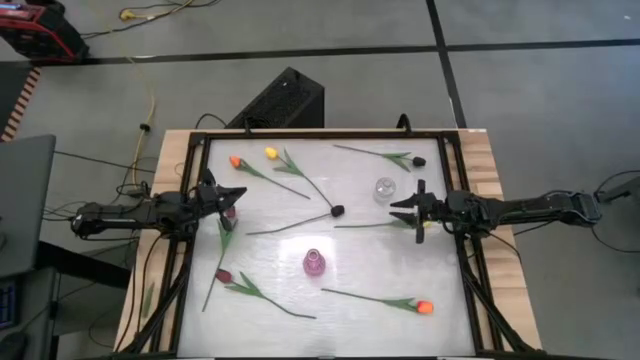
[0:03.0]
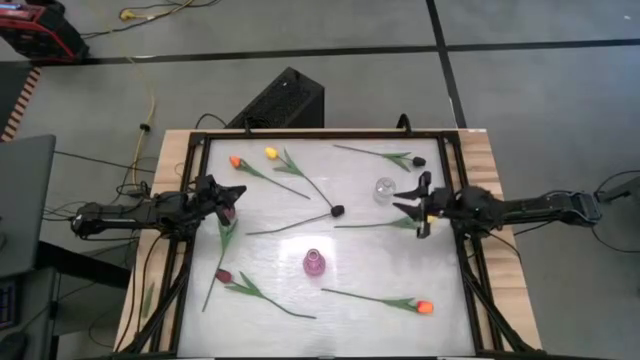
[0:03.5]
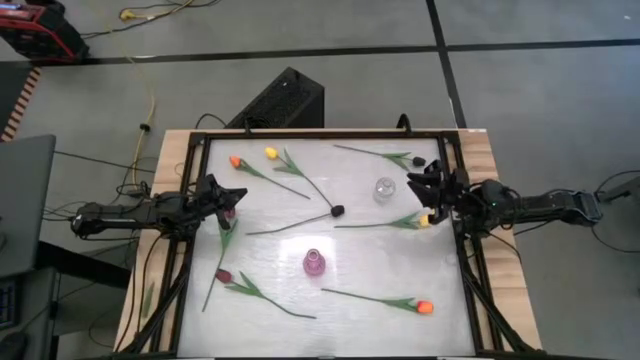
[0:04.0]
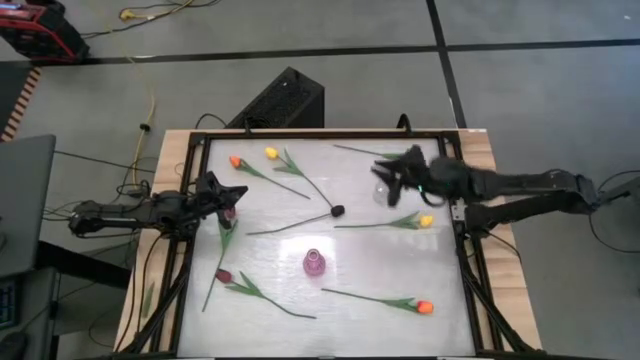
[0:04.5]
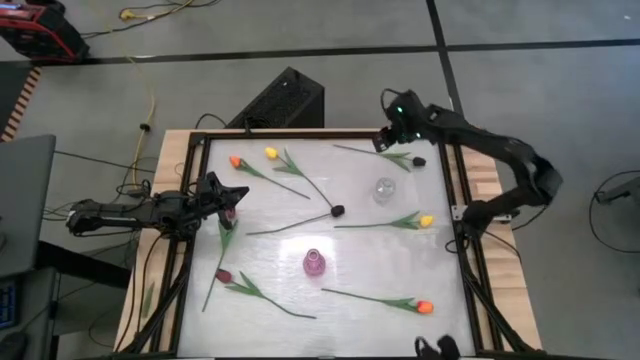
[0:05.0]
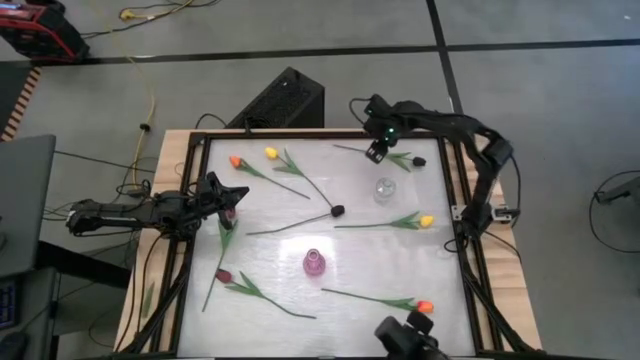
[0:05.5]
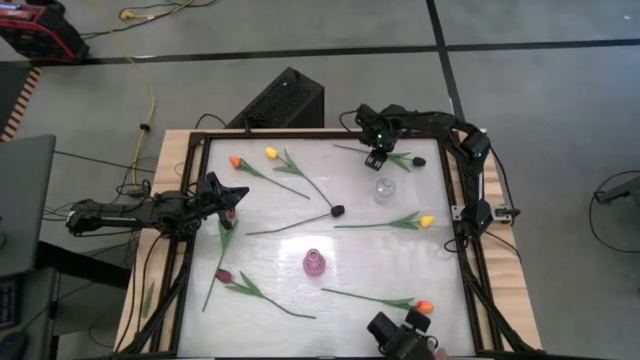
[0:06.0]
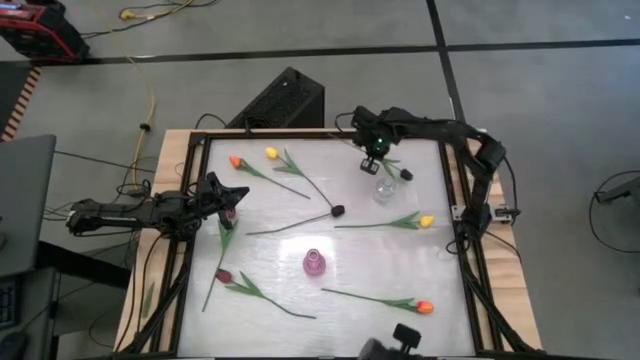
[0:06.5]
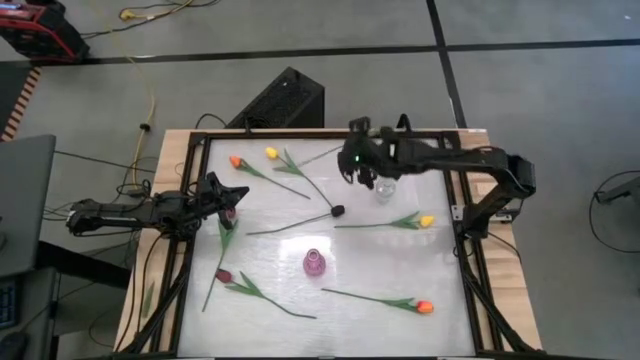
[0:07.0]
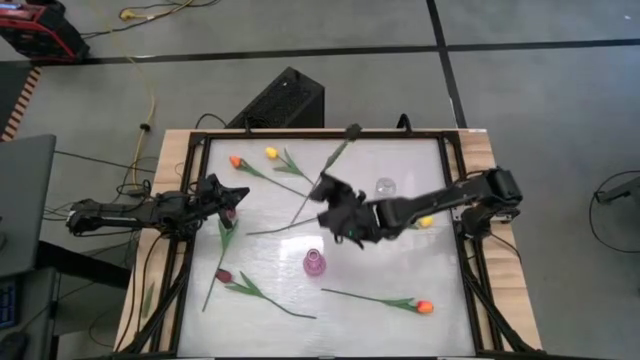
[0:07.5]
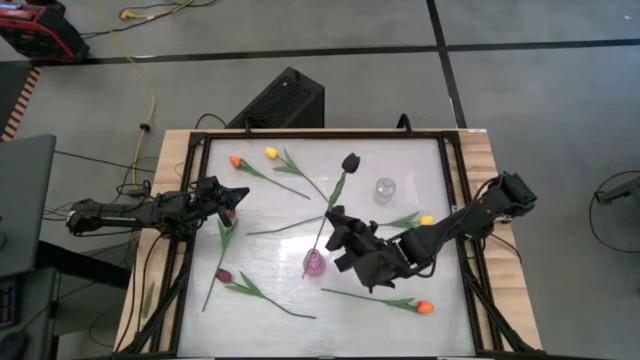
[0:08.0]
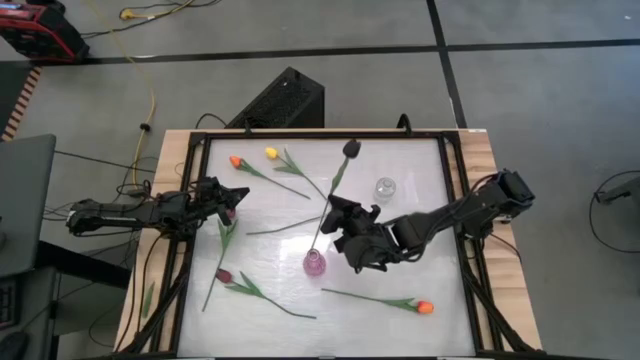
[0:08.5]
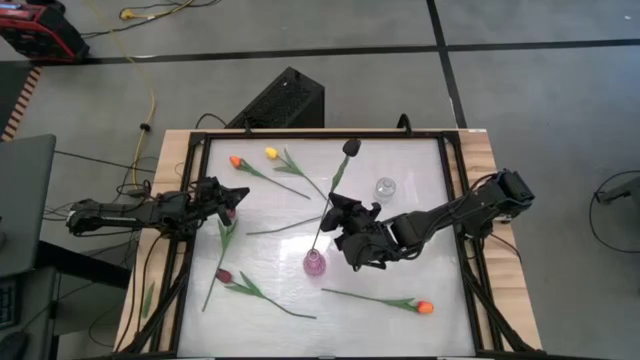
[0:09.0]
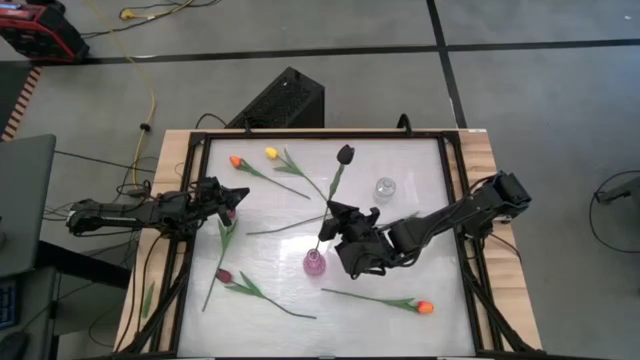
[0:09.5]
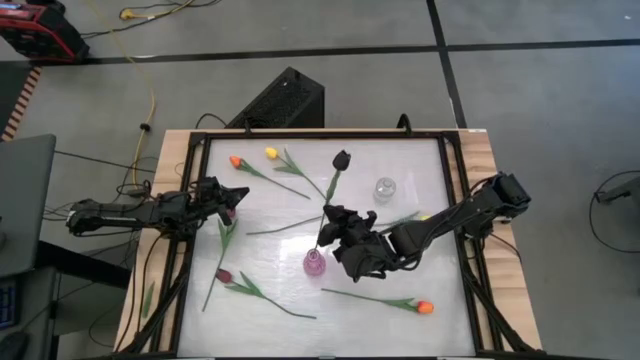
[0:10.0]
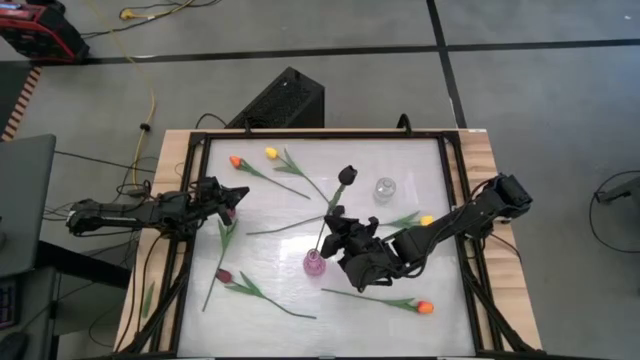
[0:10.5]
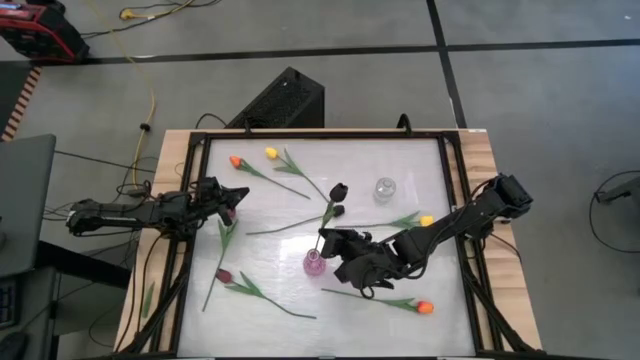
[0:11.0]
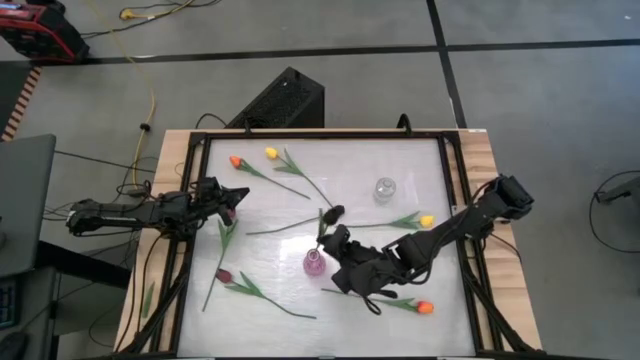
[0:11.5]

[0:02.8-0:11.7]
Task: Sort flowers into vase by color
Put the top black flower into the purple vase

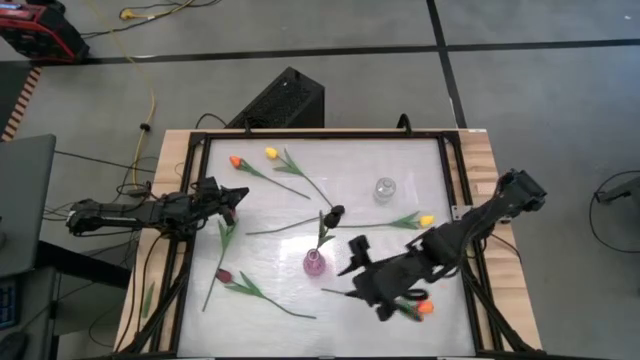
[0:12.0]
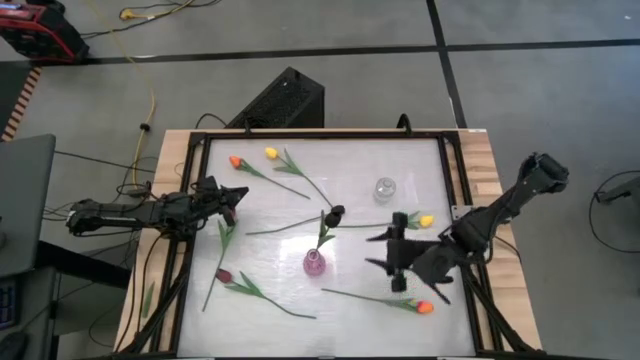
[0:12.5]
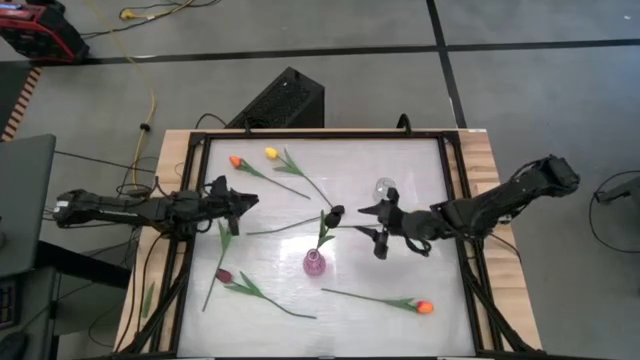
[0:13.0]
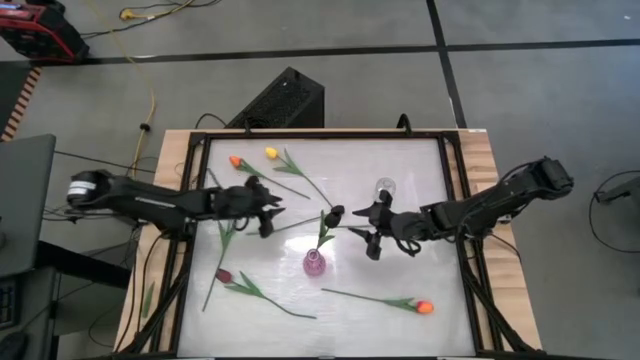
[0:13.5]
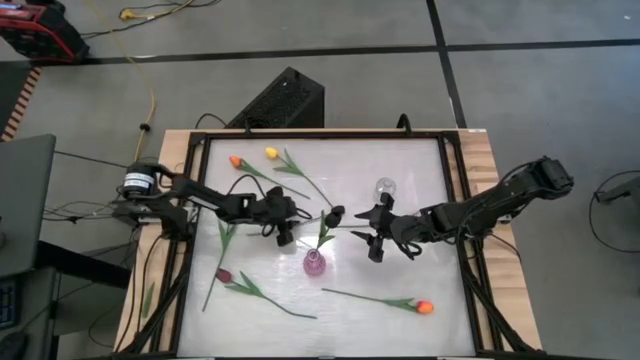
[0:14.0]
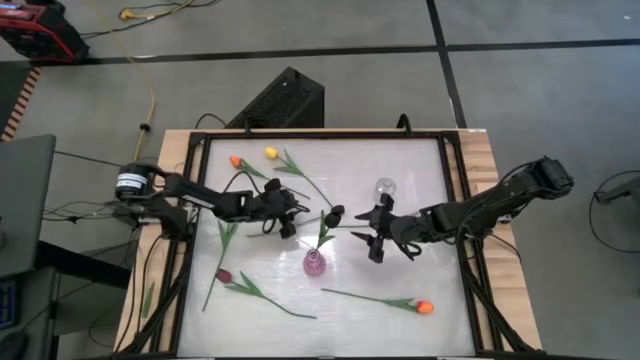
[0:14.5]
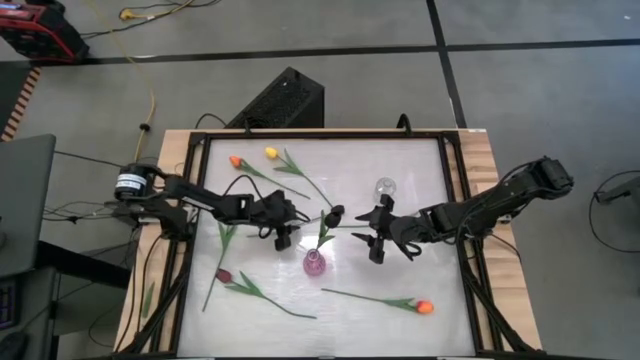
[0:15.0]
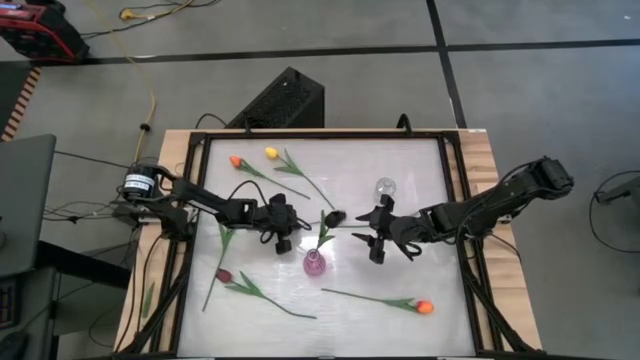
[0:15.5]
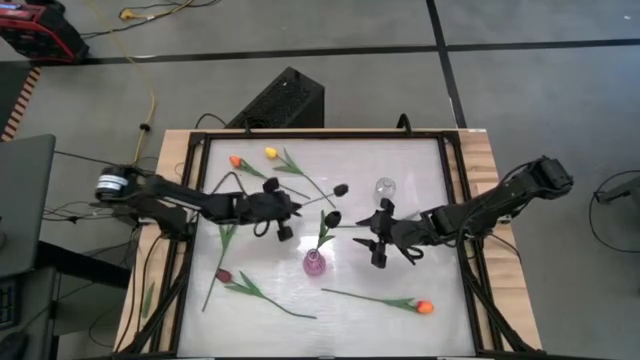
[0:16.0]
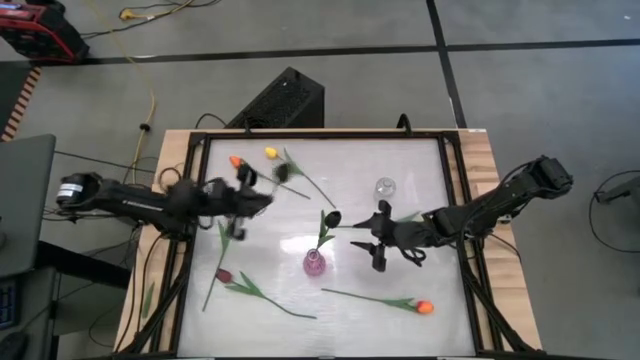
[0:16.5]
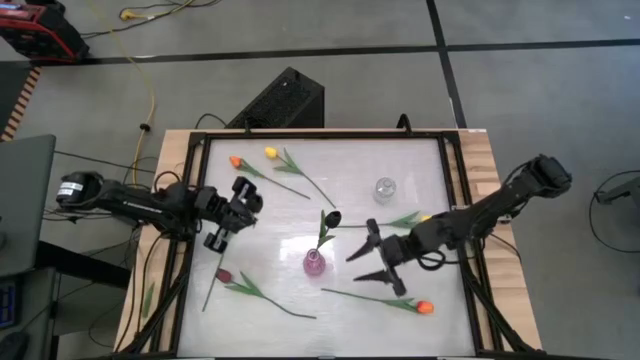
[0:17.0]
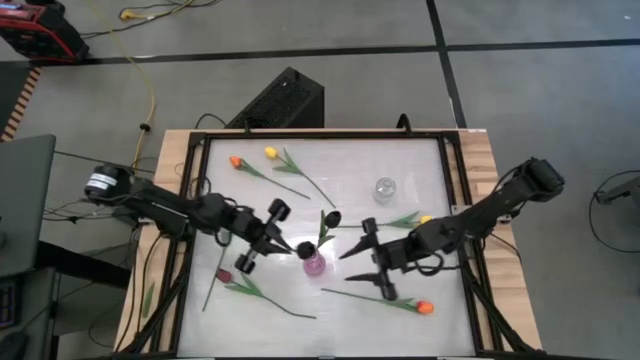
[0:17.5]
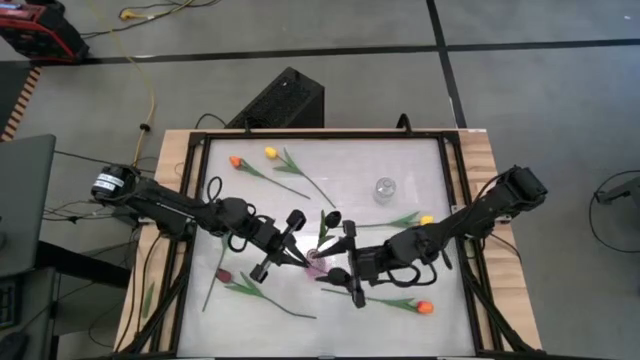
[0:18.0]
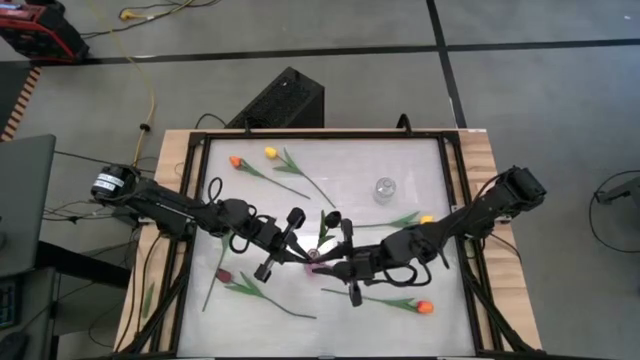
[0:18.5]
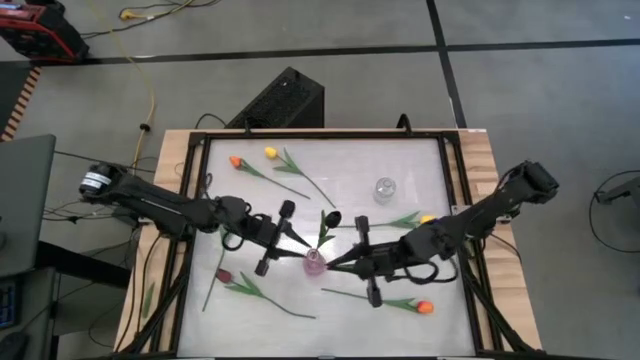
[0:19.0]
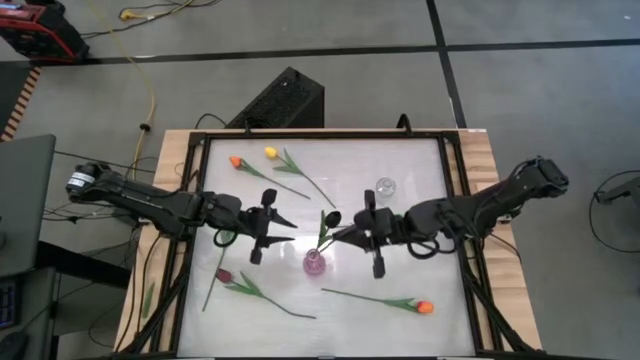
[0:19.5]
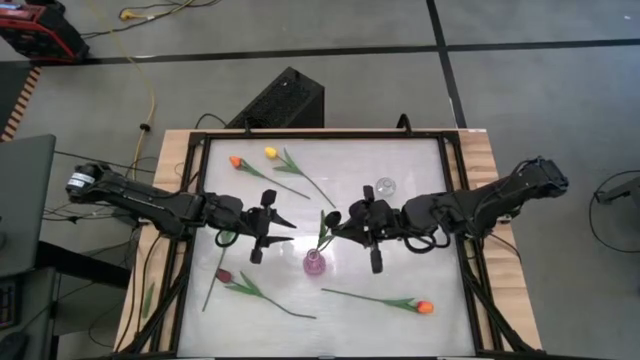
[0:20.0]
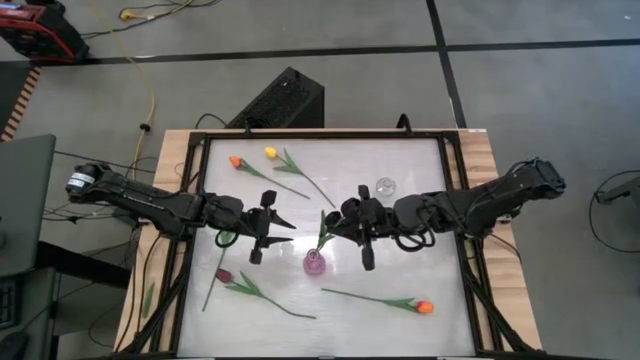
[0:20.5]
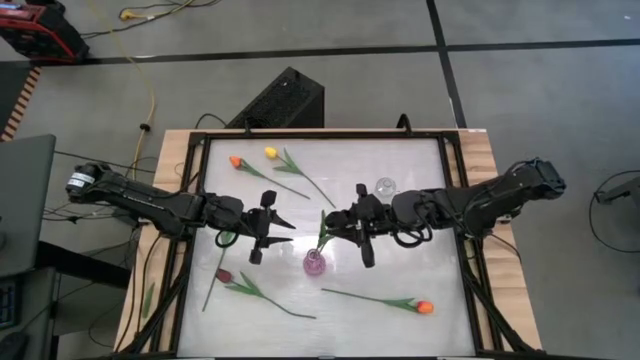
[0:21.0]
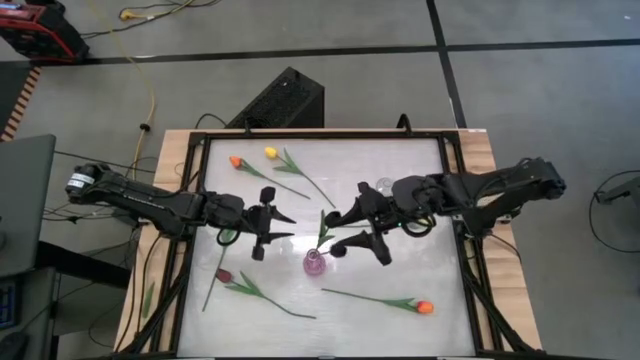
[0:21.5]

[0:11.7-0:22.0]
Put the black flower into the purple vase

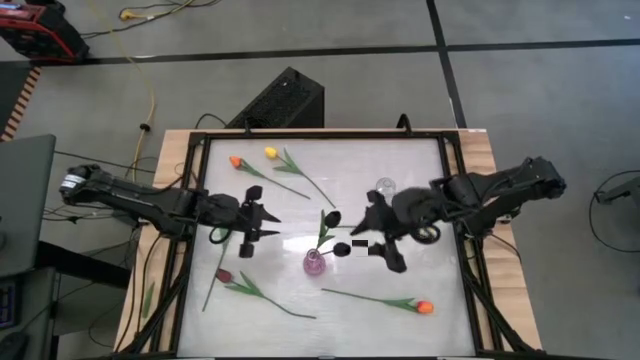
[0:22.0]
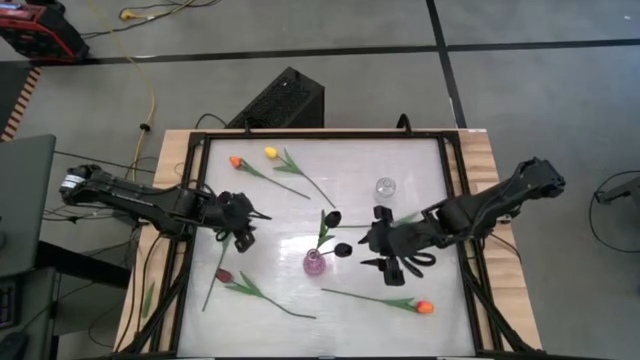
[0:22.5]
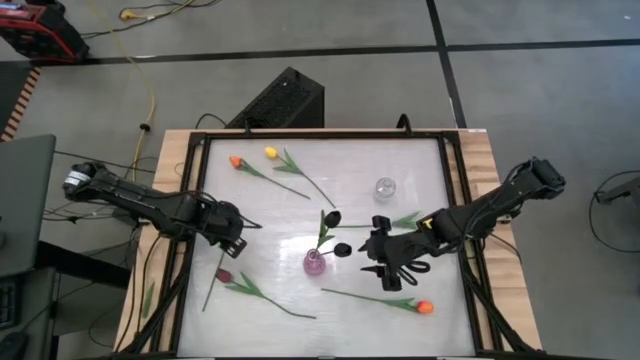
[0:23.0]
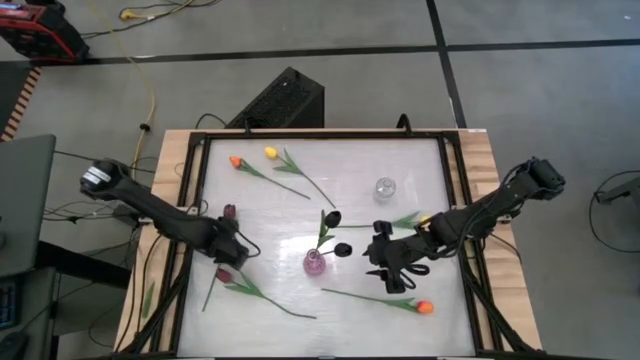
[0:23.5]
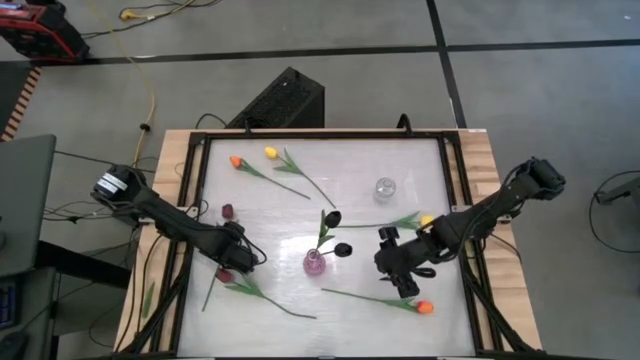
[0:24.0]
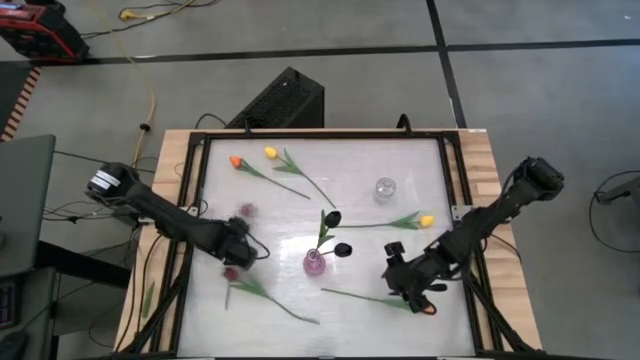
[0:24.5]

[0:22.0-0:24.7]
Put the top red flower into the purple vase
